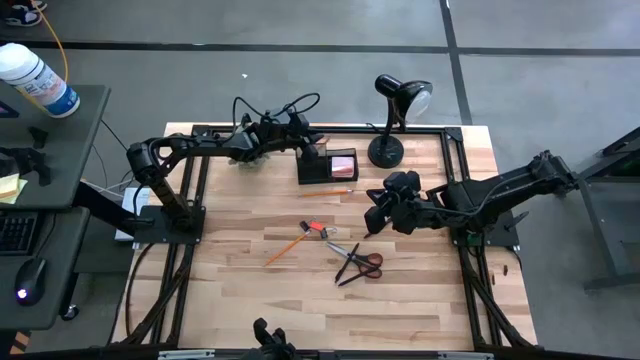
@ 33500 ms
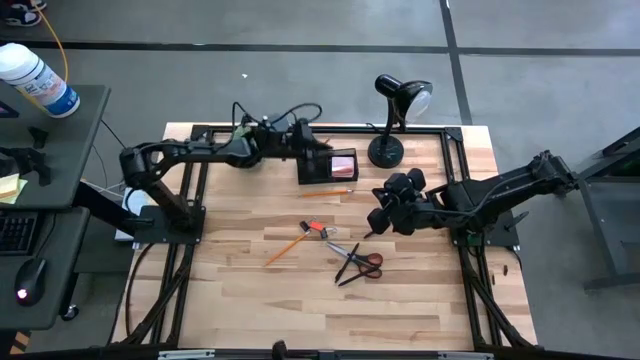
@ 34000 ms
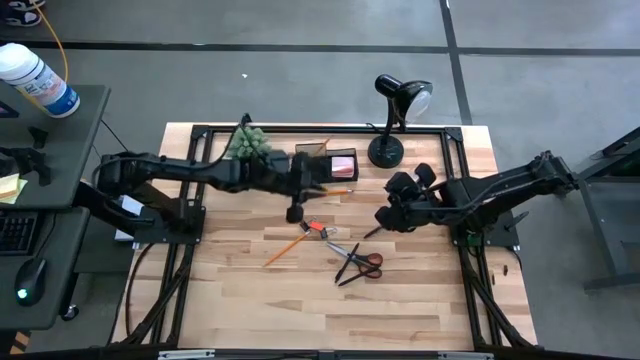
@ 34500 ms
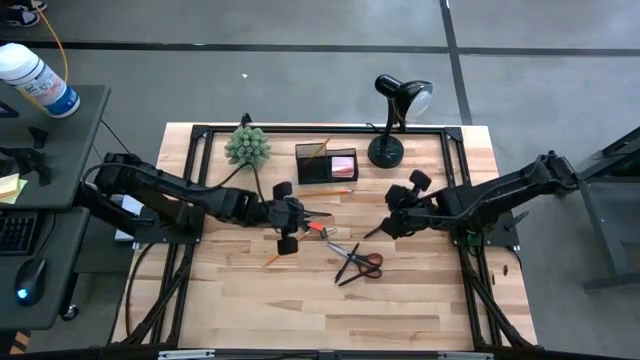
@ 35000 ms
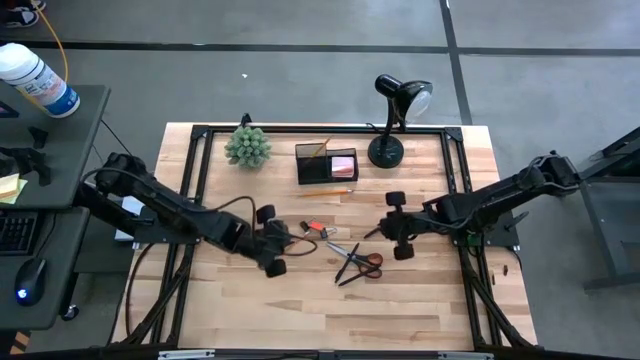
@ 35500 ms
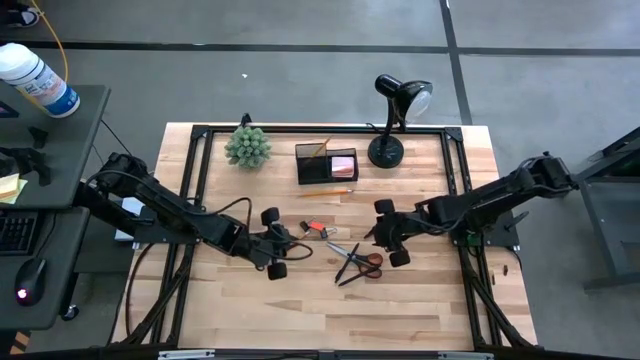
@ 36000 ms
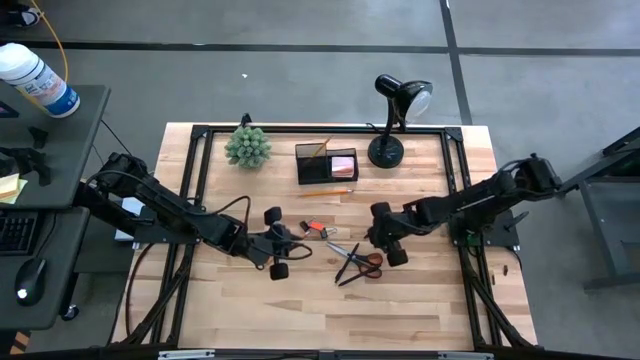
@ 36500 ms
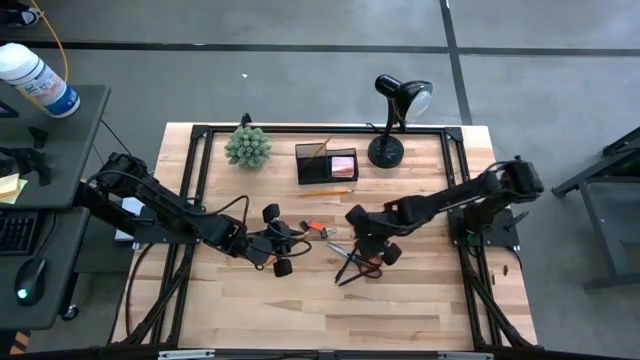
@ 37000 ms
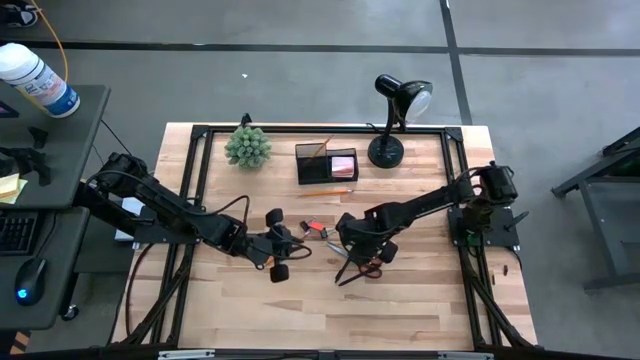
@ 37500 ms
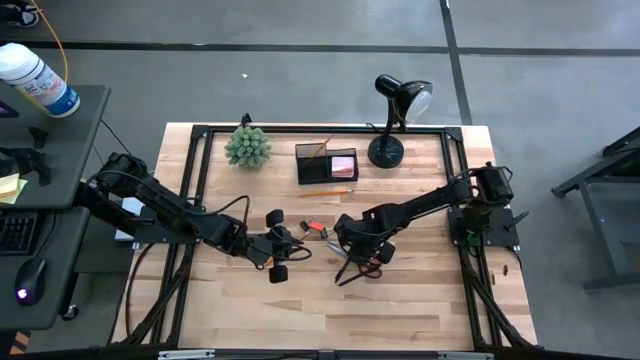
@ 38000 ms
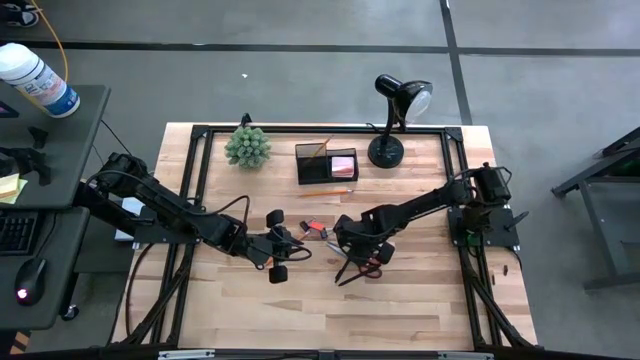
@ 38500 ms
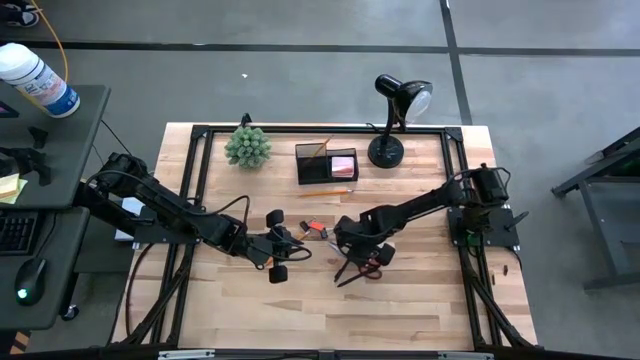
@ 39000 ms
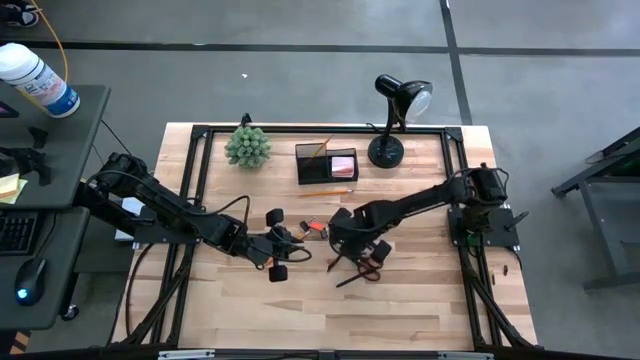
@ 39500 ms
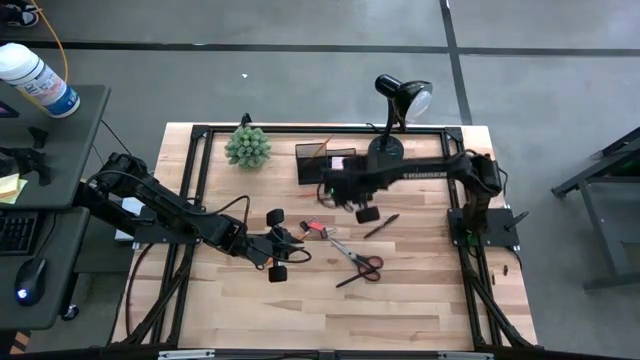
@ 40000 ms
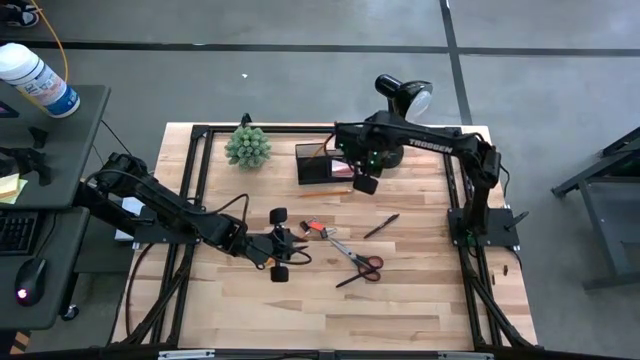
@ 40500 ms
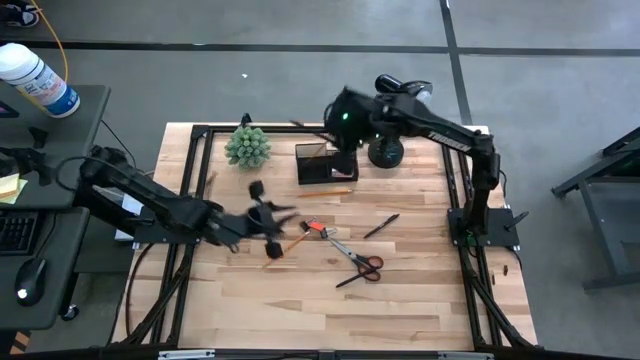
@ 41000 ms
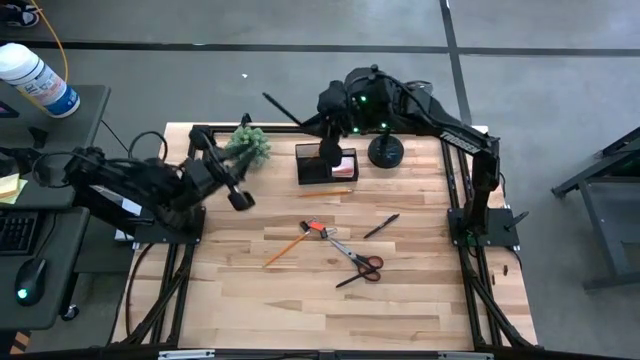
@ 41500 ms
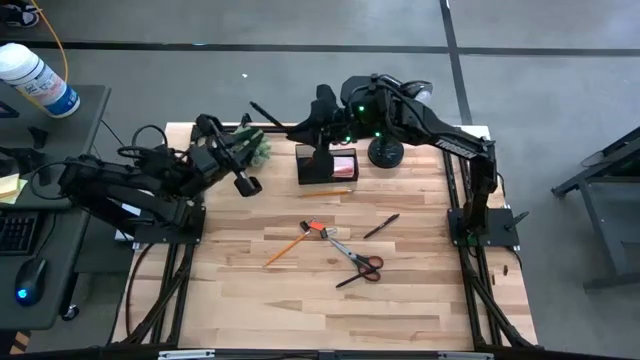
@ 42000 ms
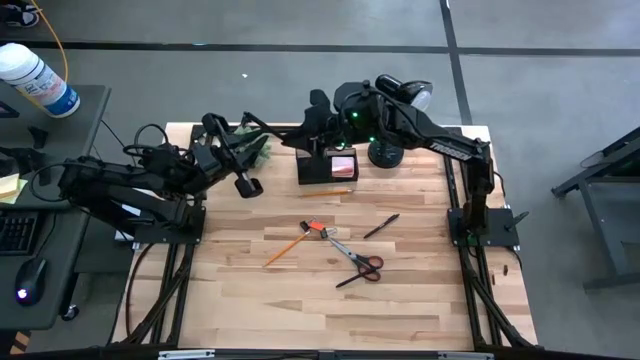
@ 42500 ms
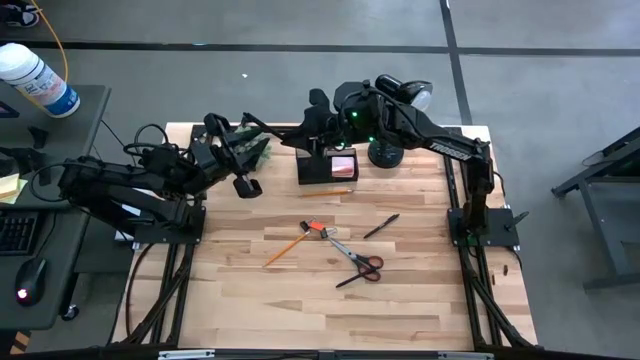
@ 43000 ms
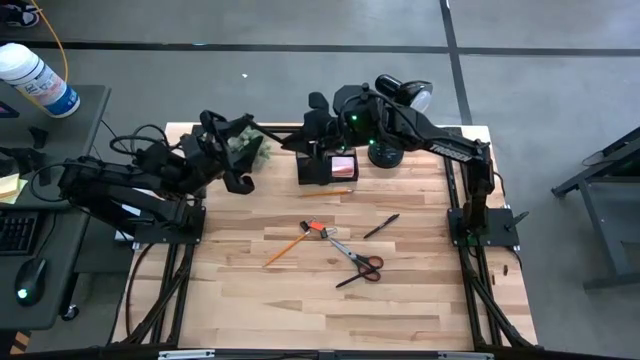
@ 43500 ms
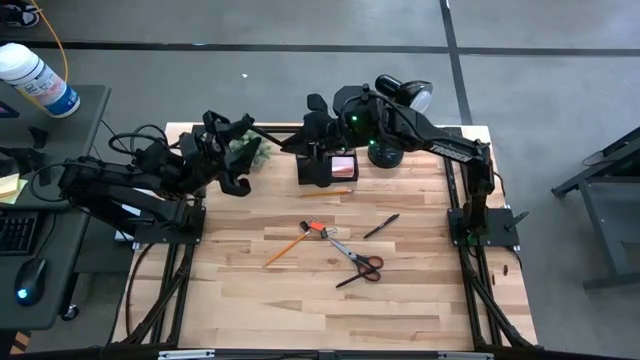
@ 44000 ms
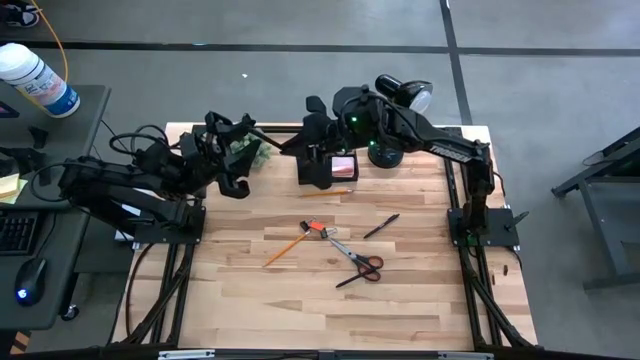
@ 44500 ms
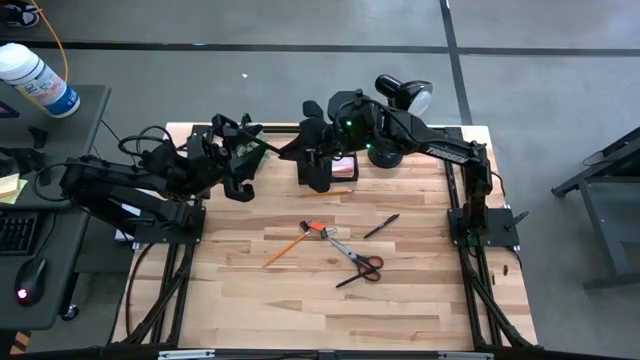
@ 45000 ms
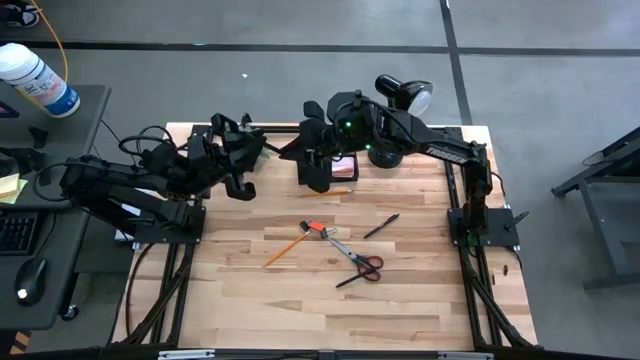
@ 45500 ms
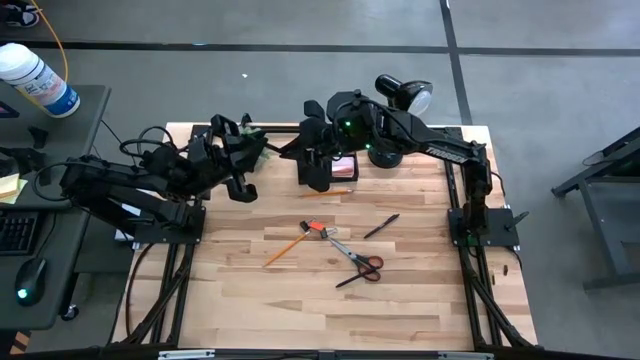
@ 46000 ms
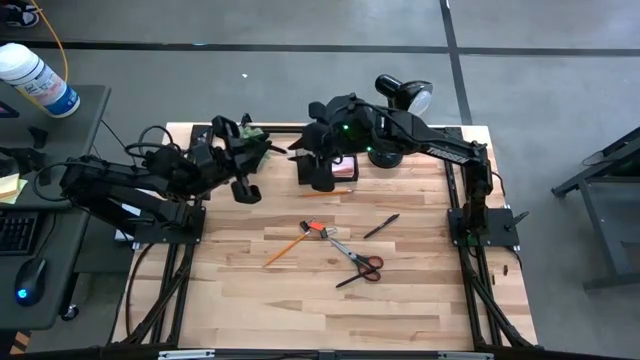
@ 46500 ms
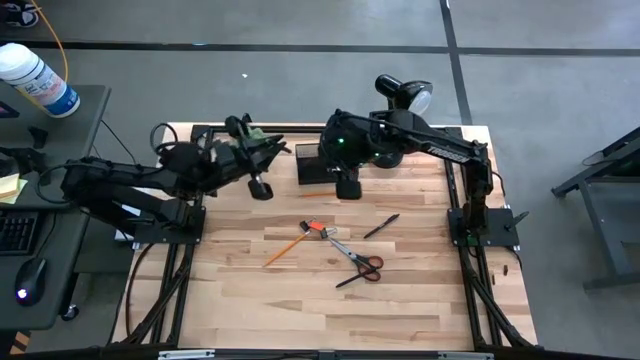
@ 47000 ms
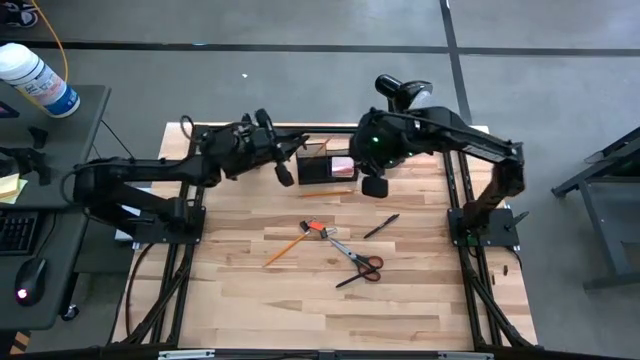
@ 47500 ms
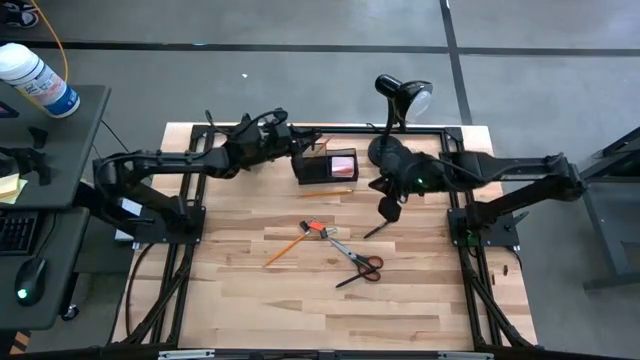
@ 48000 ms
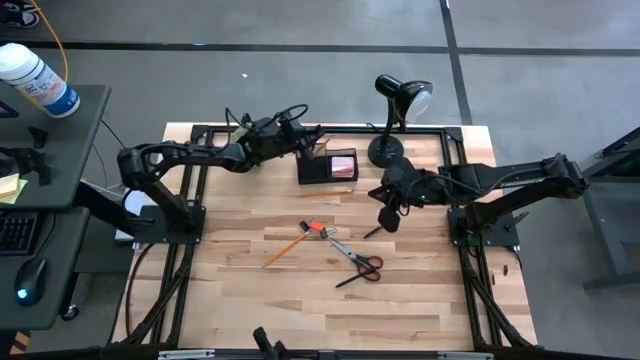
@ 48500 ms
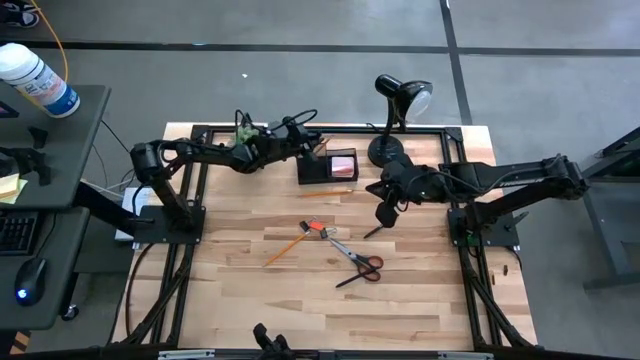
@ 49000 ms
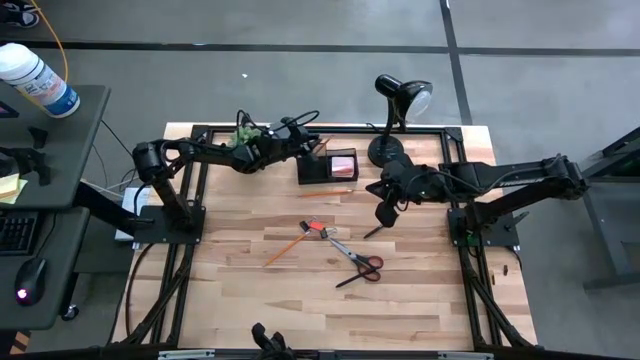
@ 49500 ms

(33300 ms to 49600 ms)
Task: Pick and place office supplies into organizer
Put the middle left black pen into the black desk organizer
